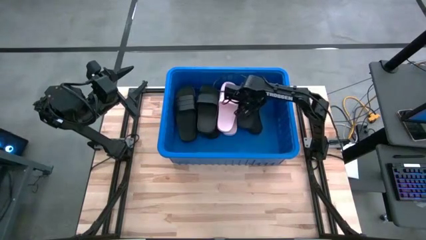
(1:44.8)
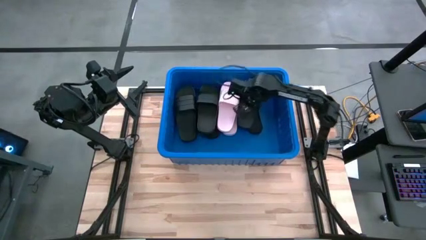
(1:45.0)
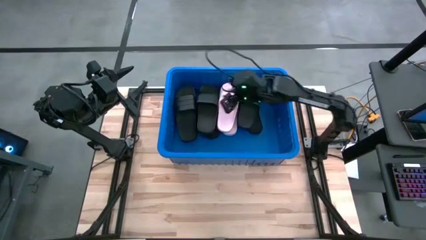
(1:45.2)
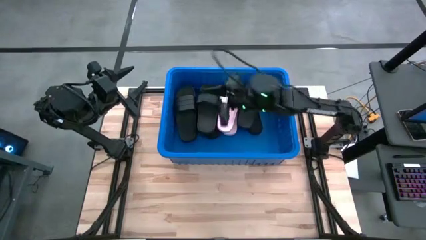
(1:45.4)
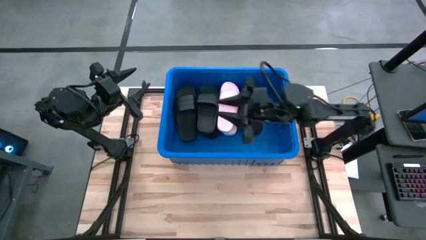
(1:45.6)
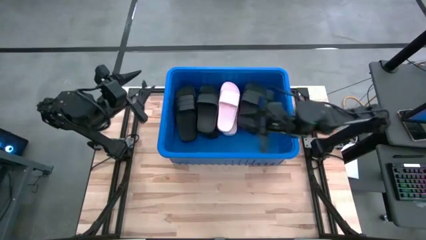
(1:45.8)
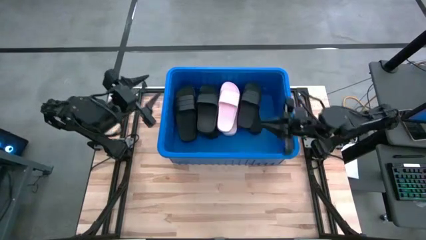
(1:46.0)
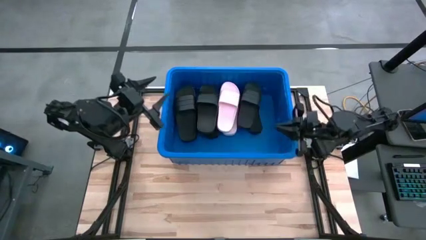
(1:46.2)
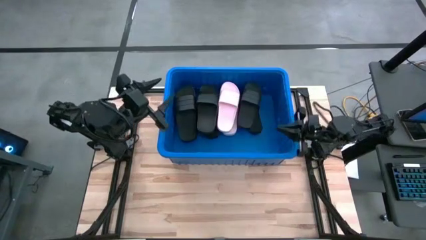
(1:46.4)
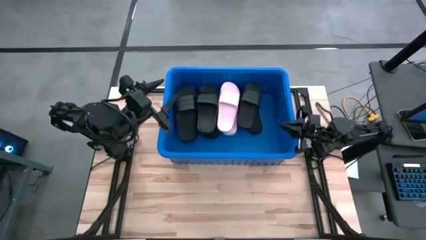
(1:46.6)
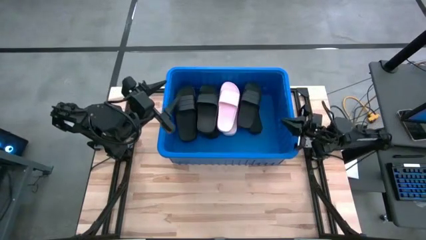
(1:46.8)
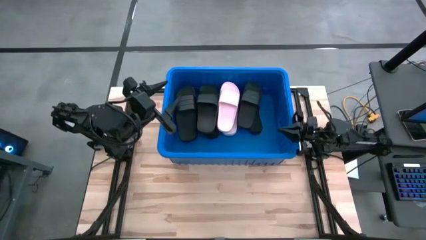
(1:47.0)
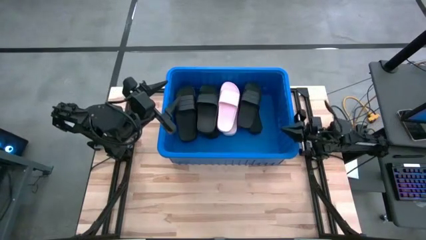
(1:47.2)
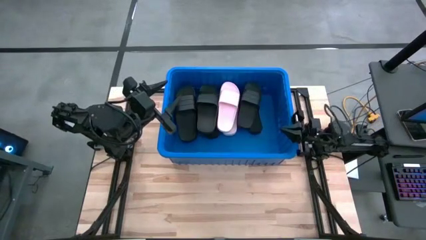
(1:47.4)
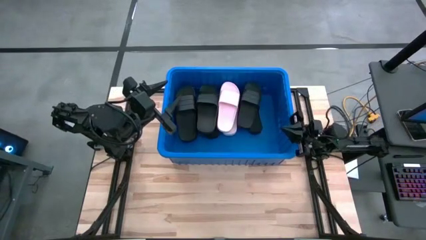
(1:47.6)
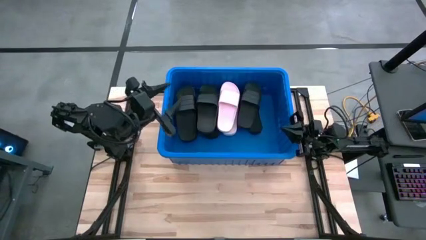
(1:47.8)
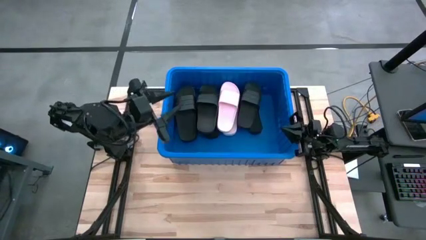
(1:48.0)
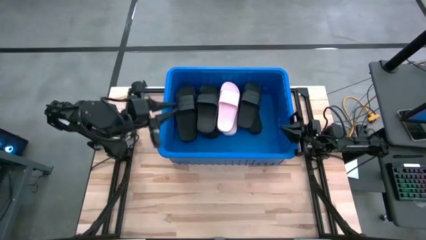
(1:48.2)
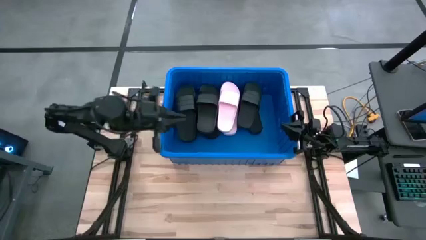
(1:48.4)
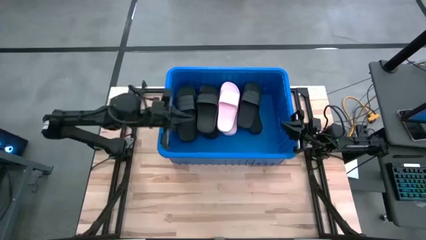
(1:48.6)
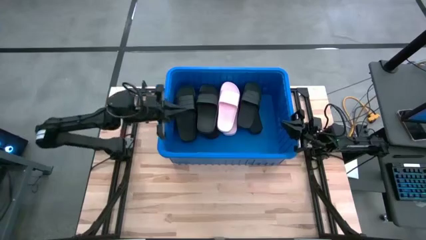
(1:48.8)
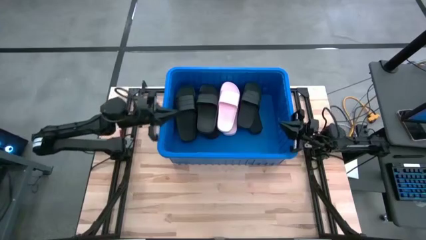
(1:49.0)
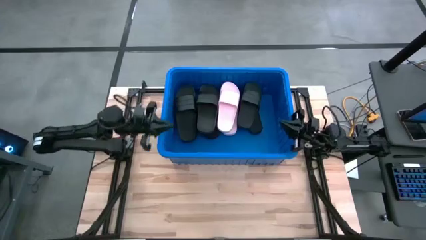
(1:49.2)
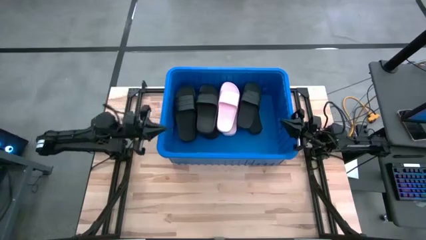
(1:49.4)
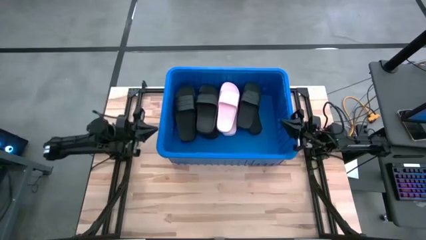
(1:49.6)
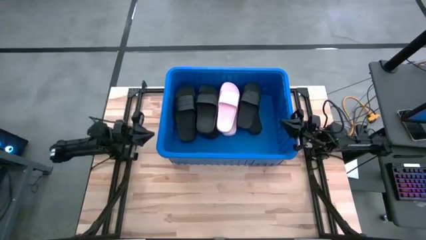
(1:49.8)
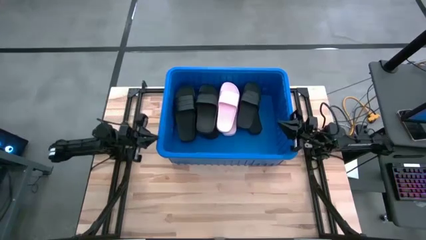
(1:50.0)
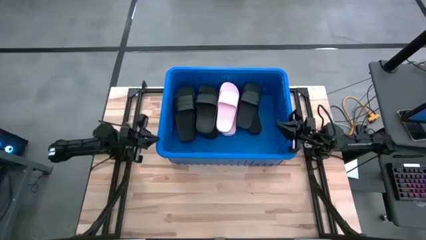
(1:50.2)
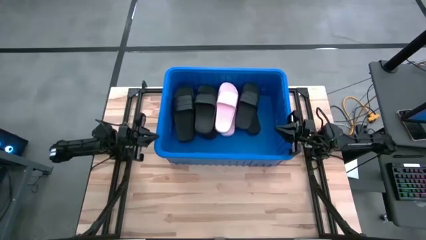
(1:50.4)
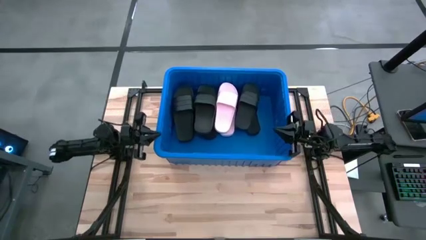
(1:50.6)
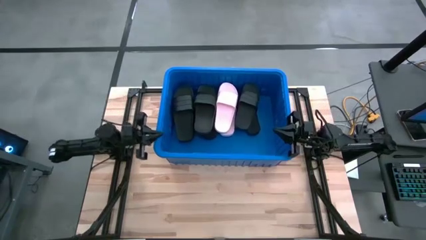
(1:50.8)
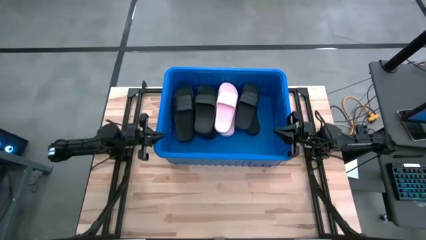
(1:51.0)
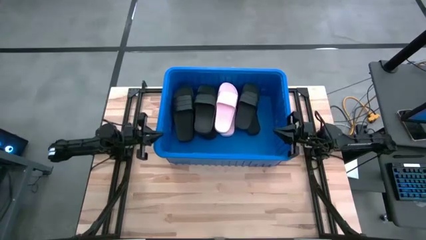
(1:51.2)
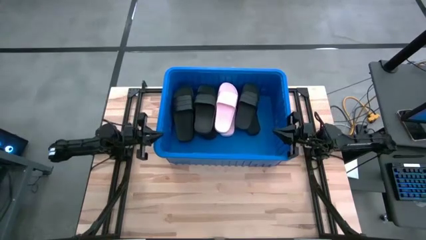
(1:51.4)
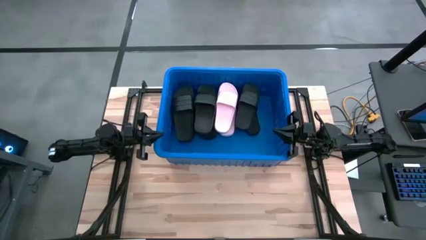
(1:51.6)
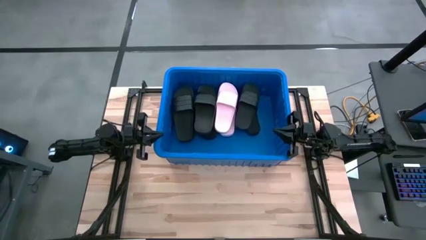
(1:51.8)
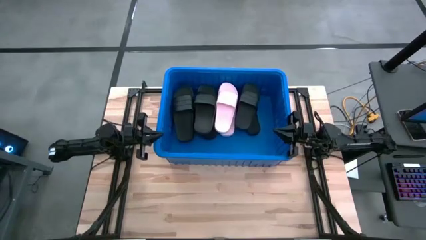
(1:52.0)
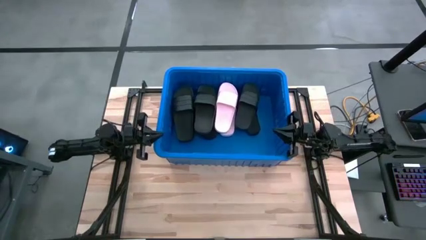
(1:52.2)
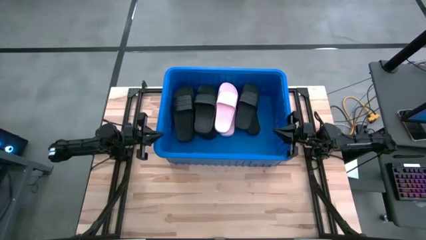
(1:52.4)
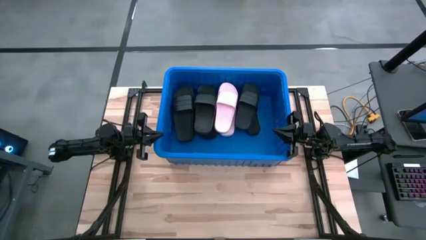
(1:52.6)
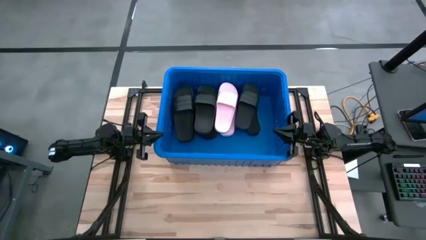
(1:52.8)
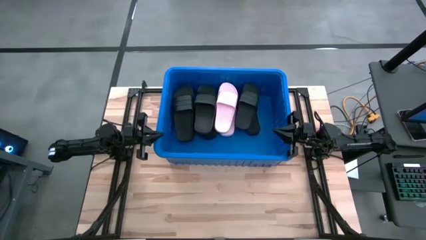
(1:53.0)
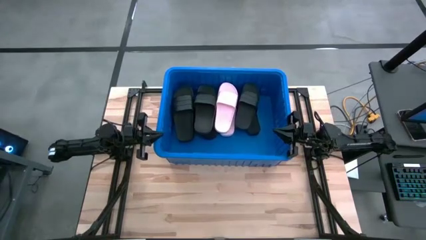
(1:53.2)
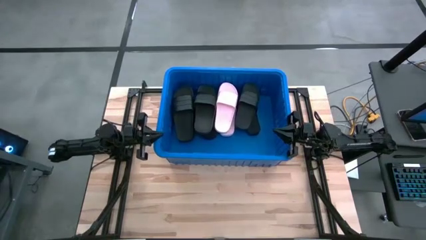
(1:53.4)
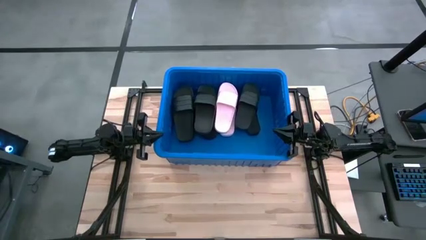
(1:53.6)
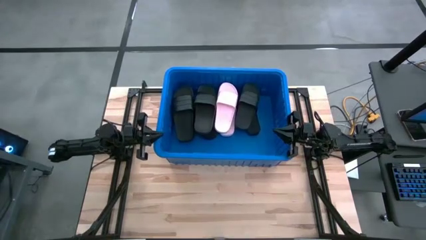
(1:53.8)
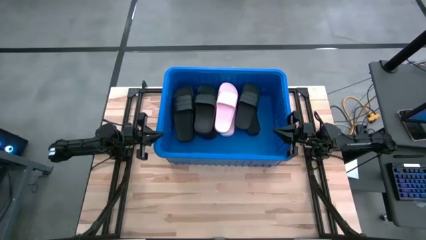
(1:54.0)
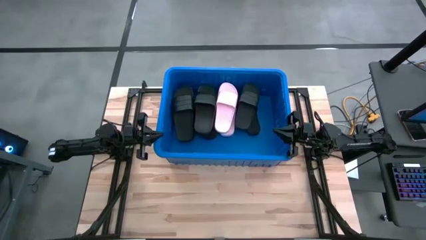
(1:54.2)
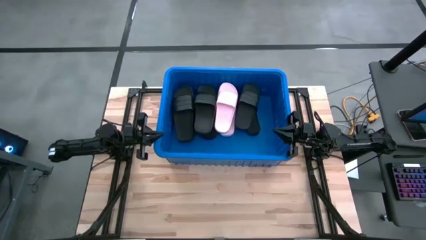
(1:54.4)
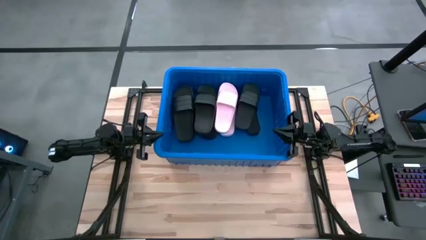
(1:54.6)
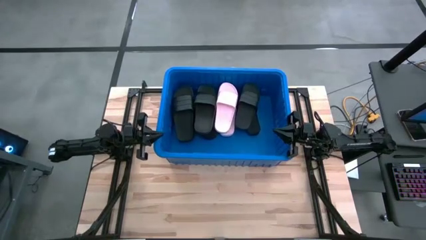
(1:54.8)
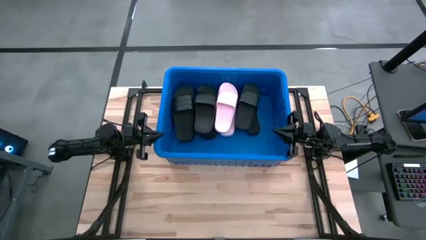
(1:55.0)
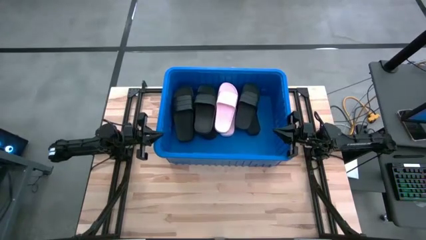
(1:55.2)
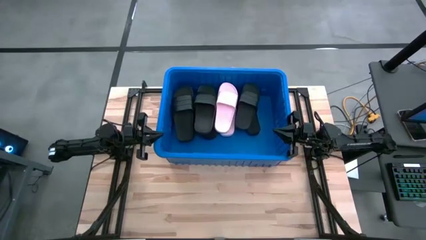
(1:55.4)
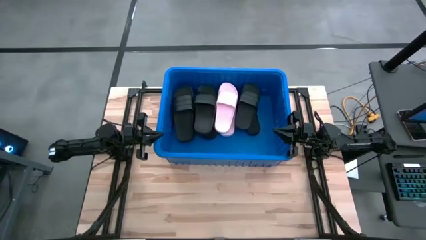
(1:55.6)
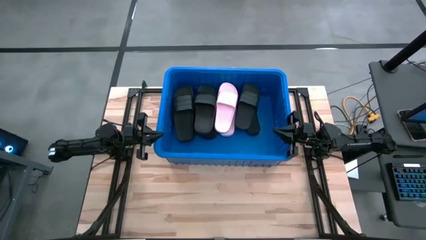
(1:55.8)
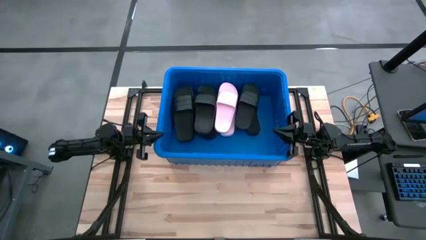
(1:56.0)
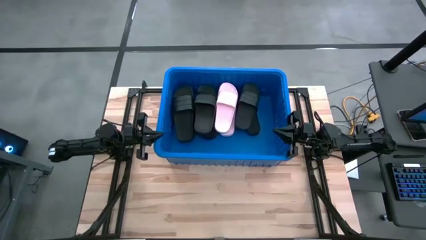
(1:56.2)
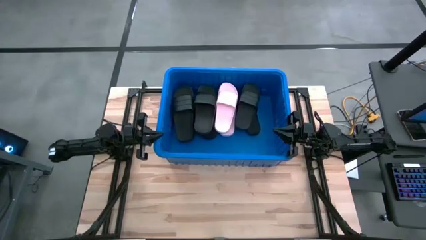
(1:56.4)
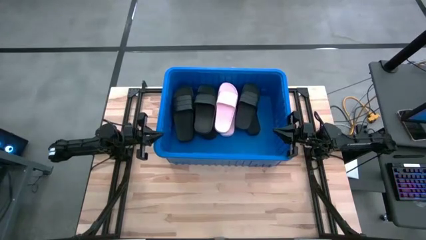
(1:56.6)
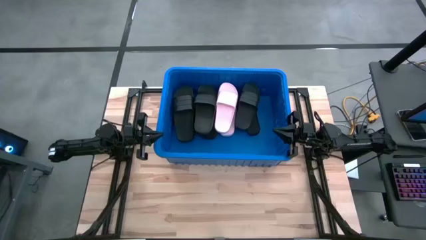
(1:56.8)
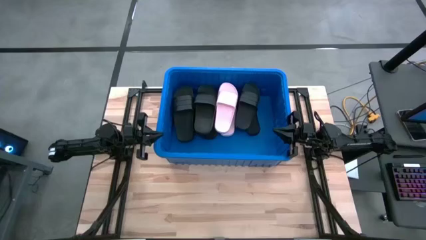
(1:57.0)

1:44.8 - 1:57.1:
Task: Pick and place slides into bin
Return to Home Position
